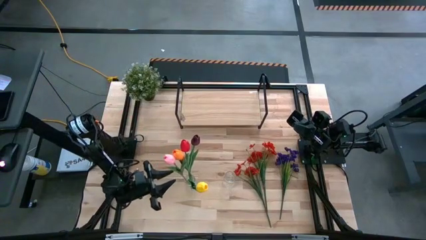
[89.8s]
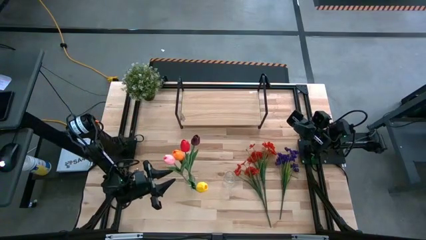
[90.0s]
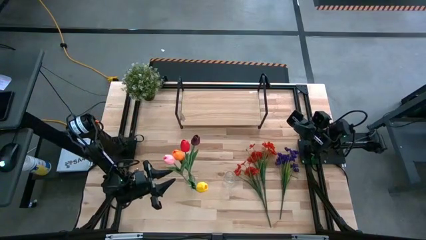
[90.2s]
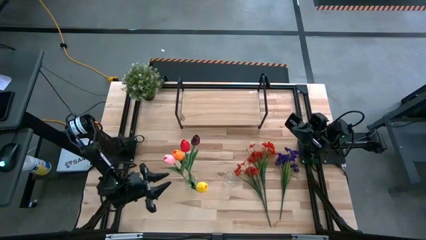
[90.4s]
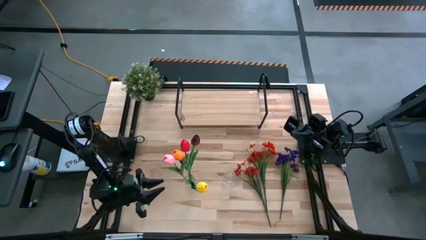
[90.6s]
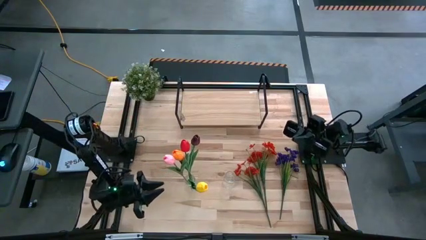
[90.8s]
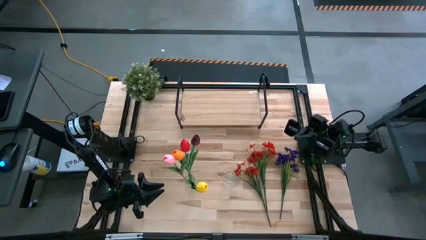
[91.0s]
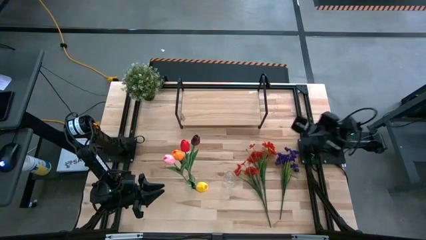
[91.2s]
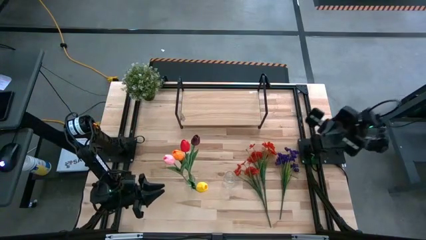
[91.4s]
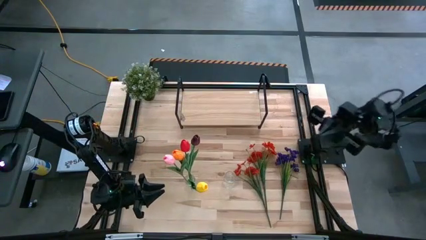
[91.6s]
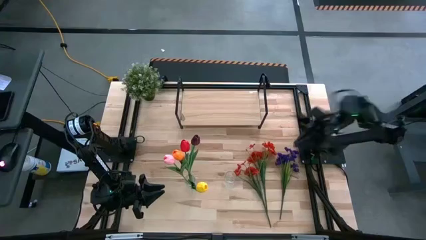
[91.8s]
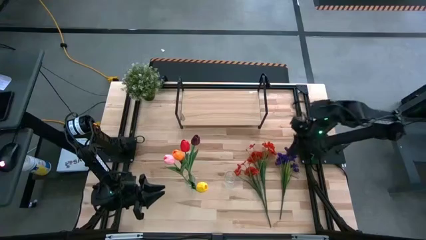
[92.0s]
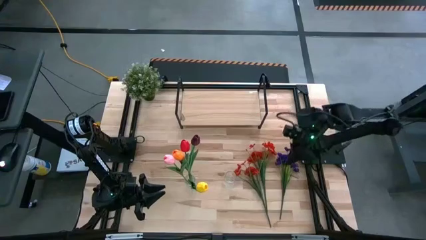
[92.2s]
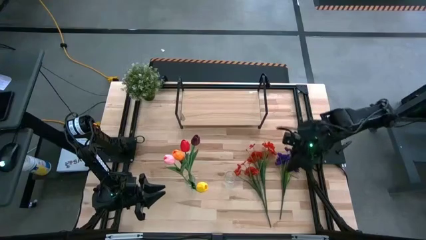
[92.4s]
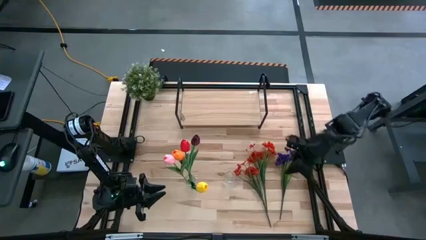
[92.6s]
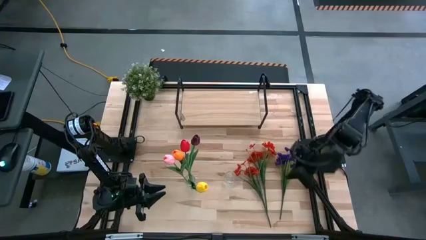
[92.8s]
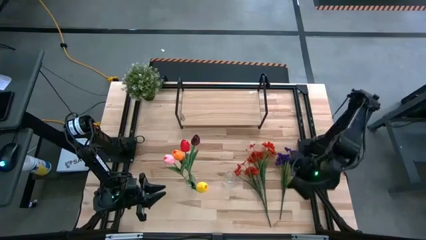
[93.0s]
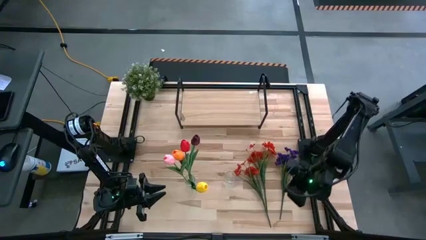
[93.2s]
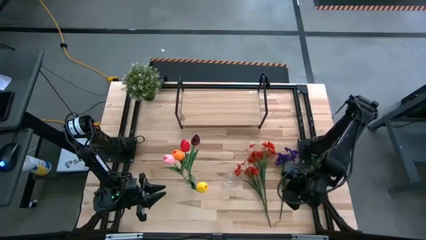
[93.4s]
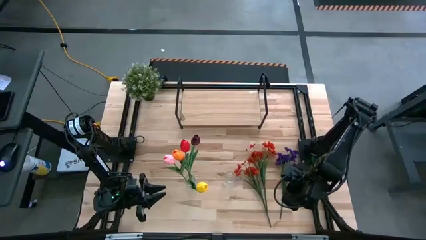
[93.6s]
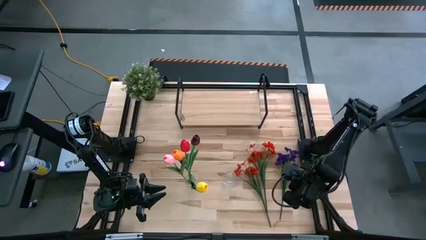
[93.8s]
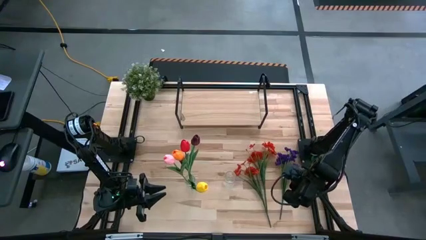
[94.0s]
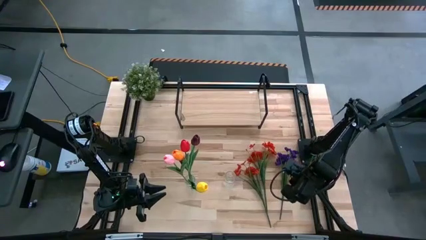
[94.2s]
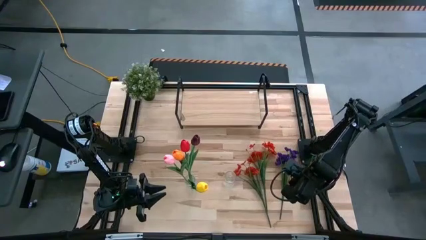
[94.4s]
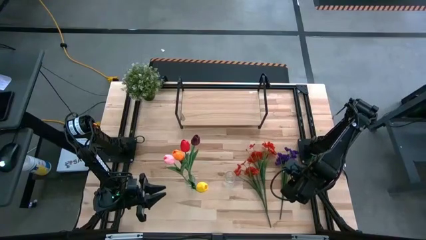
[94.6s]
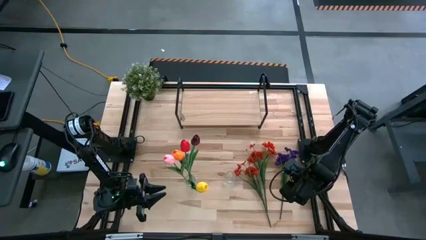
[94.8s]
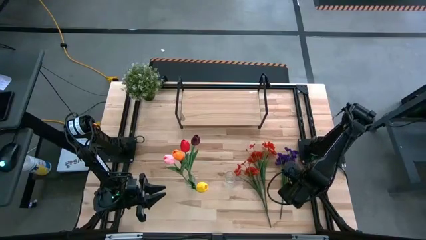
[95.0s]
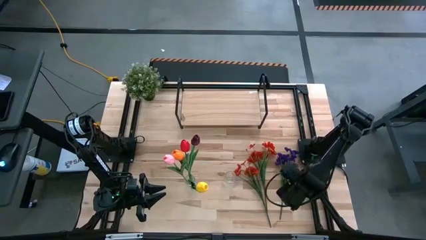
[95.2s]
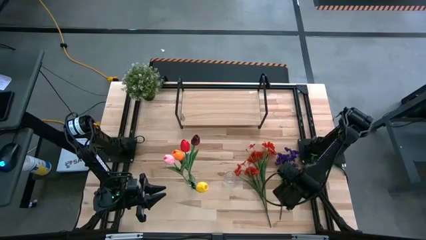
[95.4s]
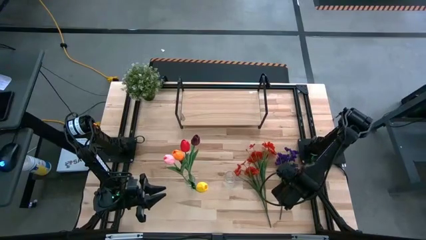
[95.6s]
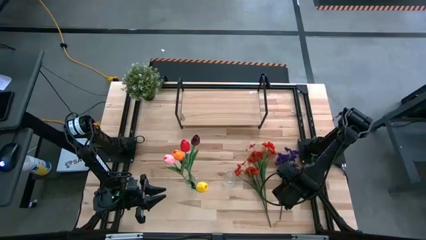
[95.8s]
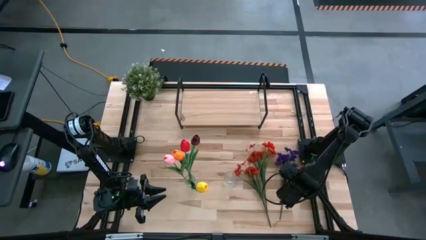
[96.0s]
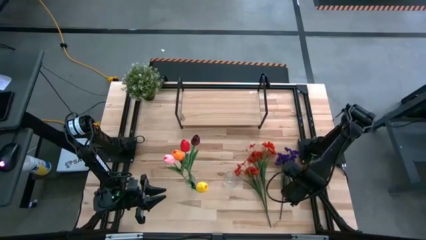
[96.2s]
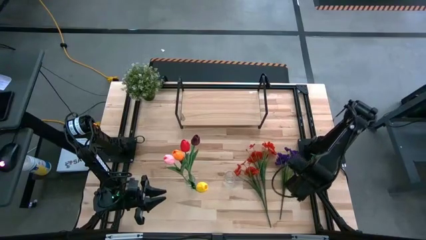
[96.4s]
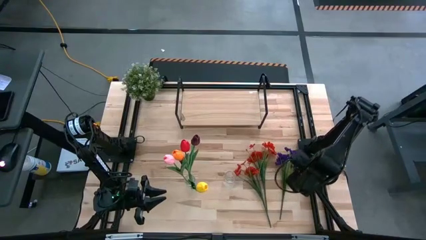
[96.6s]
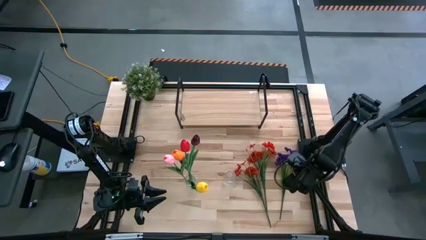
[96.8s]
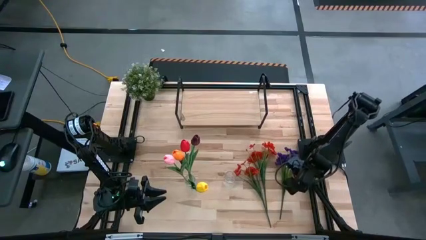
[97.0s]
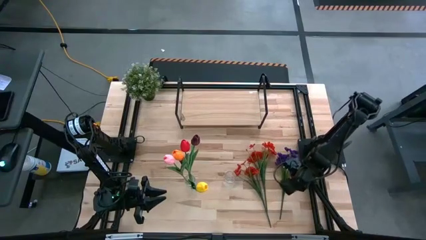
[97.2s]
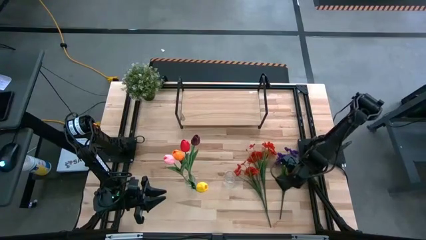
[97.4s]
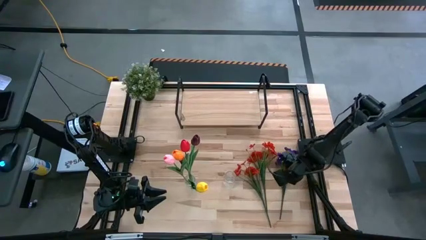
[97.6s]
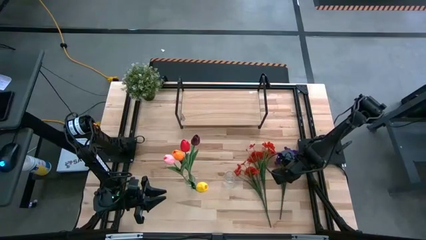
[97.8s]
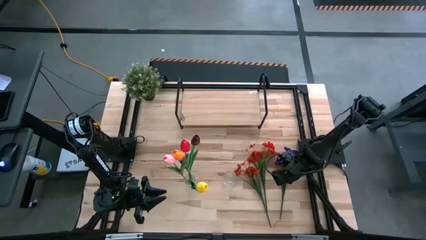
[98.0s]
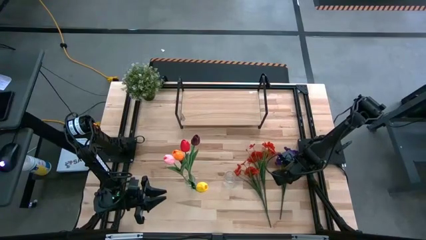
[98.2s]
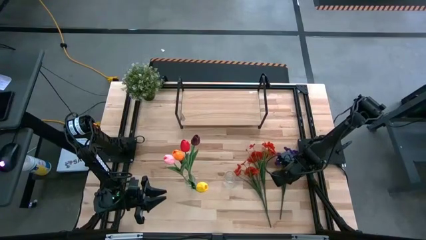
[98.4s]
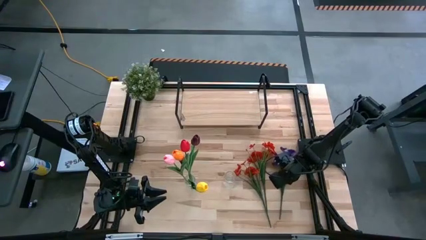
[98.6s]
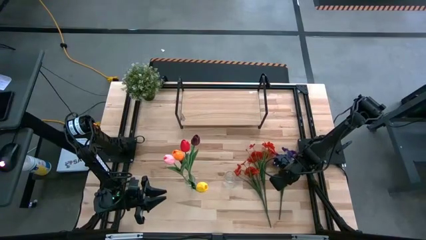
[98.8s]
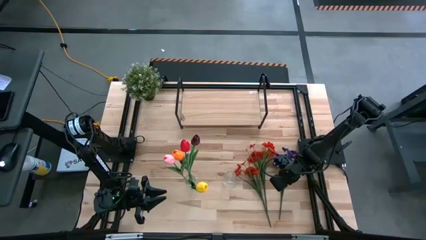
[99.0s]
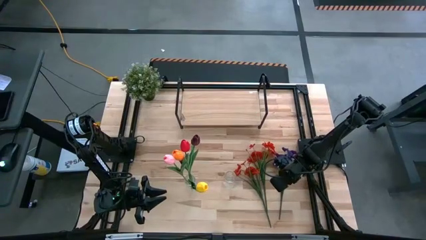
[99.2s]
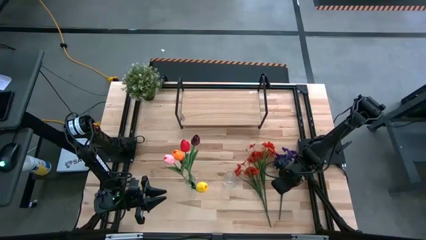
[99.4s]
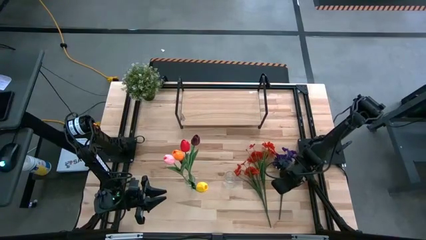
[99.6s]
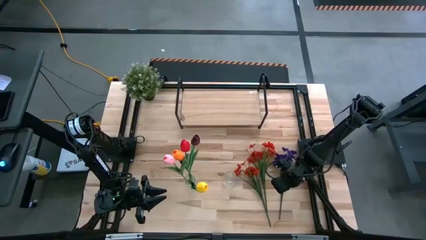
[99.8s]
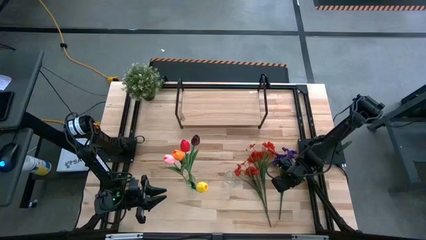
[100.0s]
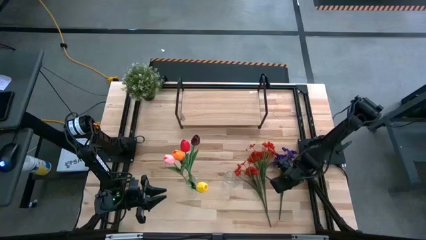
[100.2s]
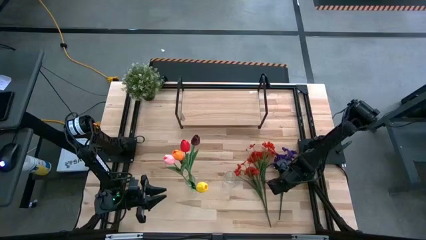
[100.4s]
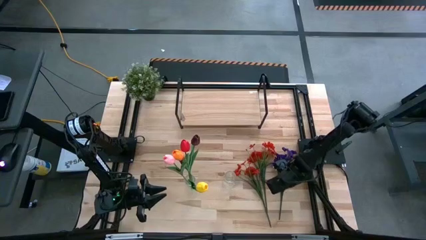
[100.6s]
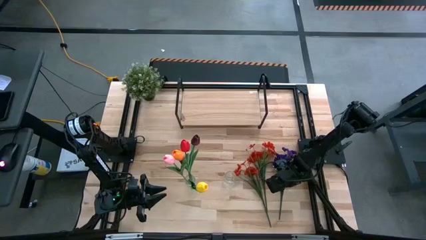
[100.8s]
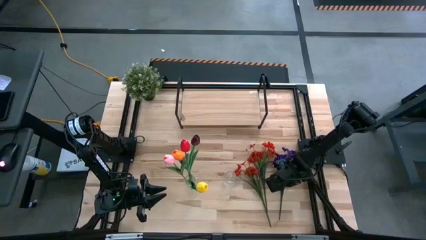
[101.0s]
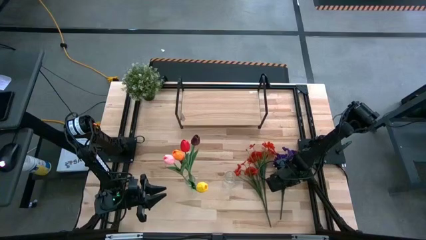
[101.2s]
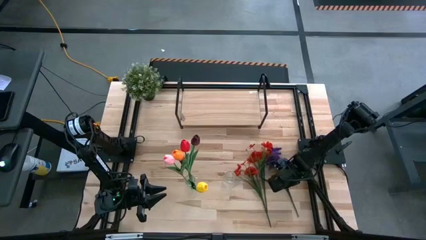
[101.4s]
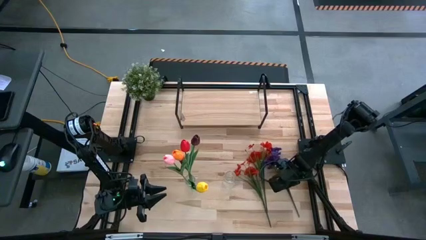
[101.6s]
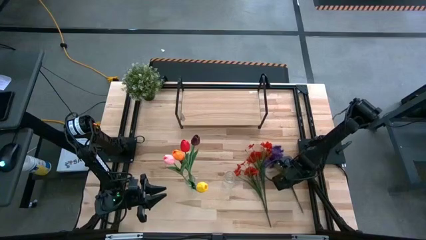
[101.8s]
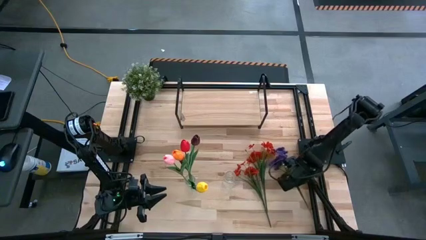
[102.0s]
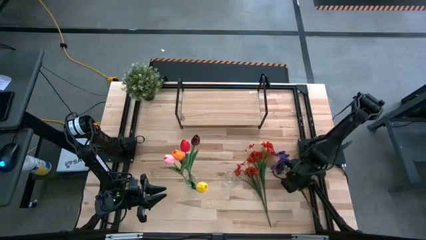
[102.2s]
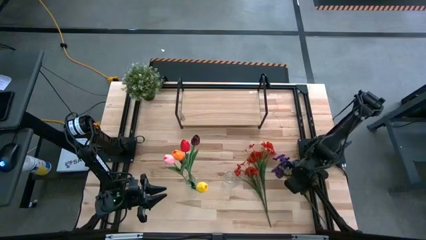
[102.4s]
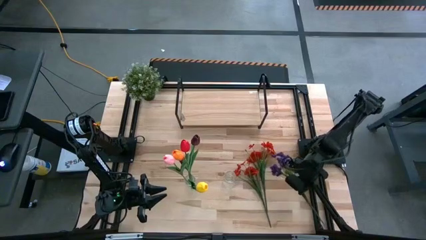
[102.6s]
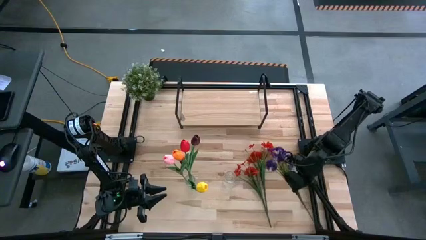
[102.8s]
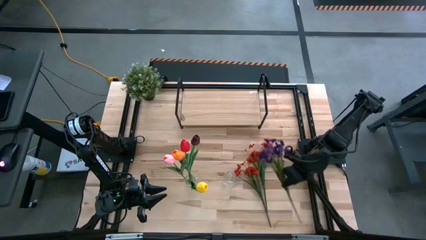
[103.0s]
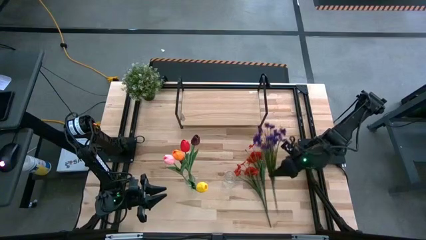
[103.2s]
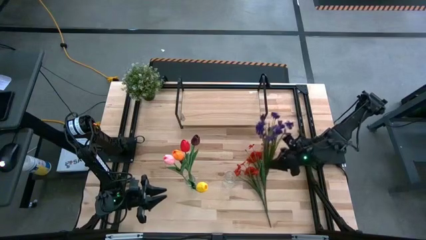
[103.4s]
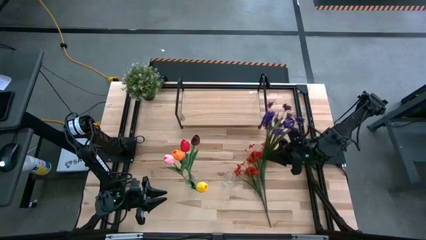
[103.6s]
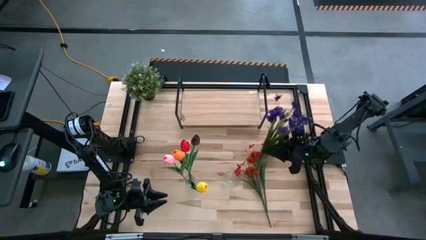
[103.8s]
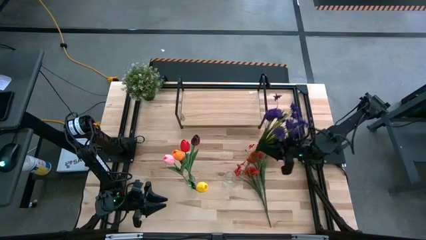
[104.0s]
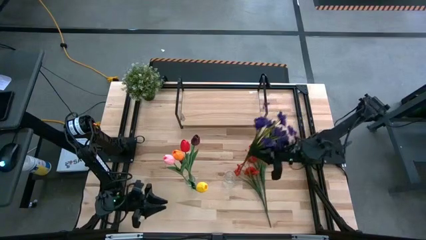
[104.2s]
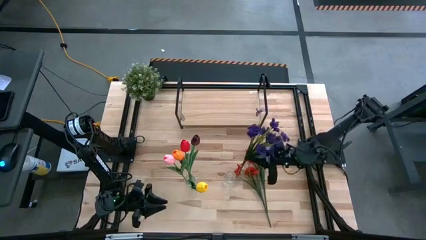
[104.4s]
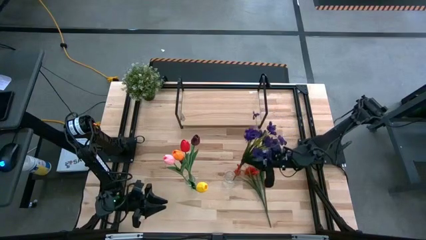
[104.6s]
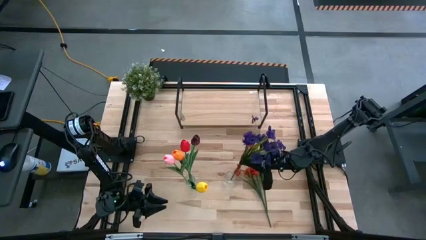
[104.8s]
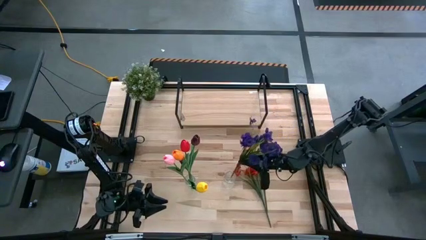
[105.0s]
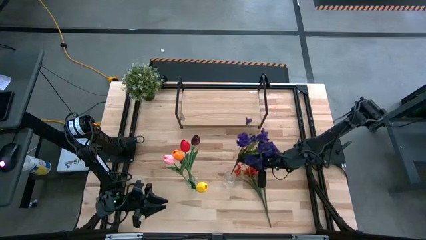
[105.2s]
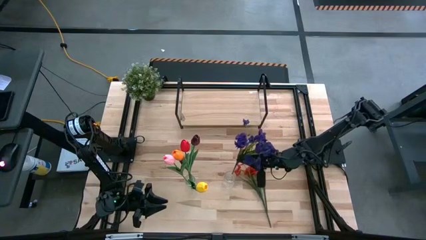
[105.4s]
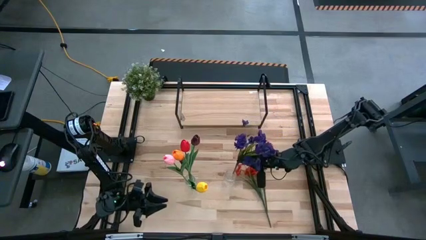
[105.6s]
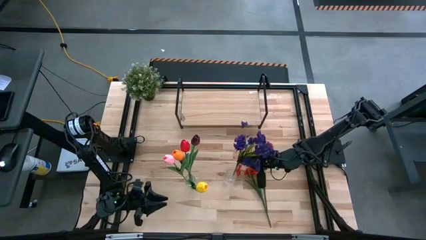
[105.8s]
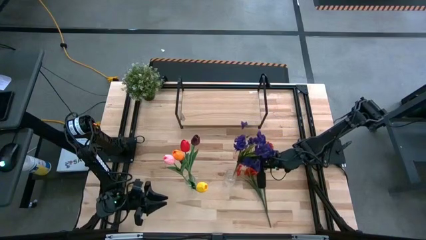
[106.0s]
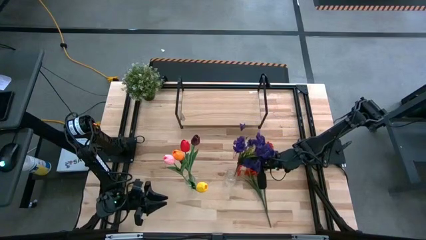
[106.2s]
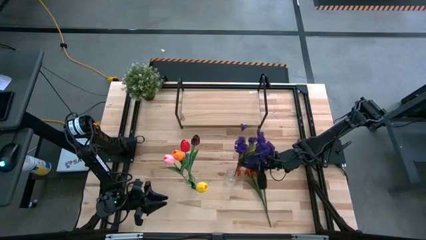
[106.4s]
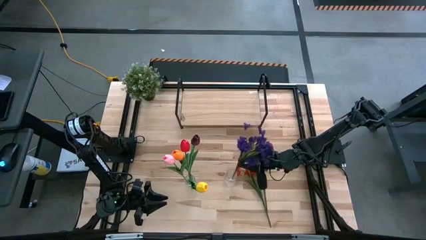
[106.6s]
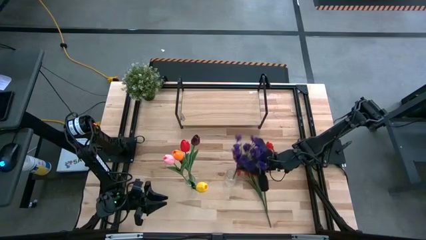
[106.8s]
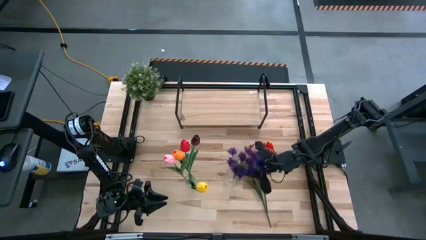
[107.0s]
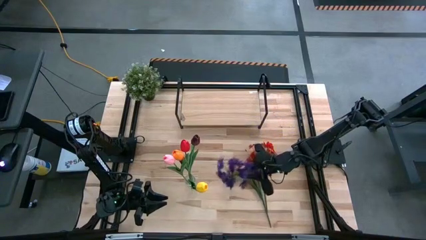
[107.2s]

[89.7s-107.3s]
Task: Pick and place flowers into a vace then onto a shelf
Put the violet flower into the right transparent vase
